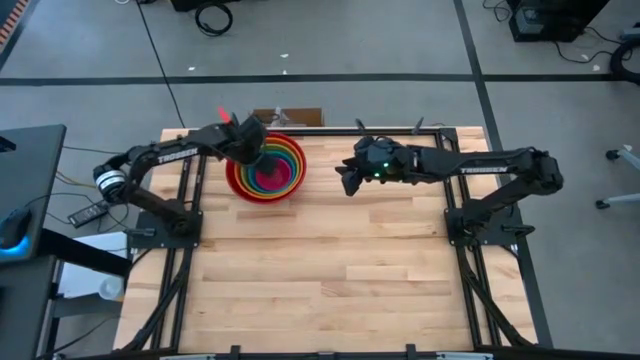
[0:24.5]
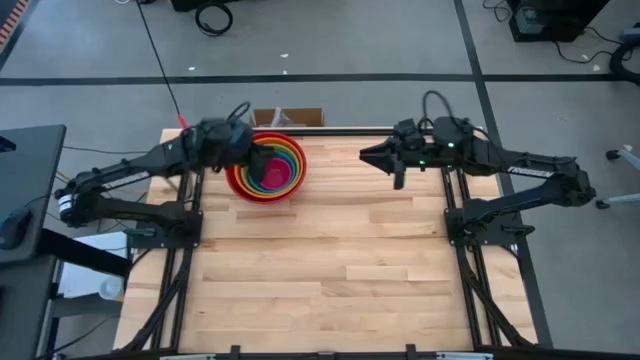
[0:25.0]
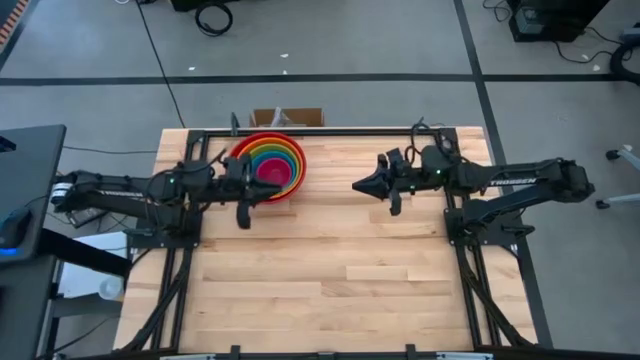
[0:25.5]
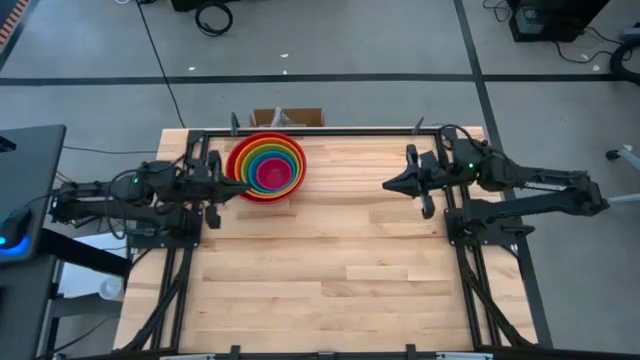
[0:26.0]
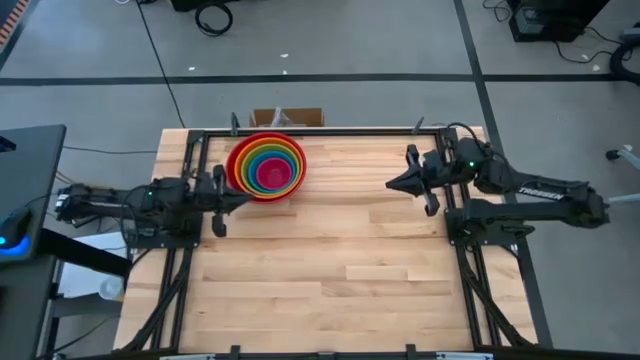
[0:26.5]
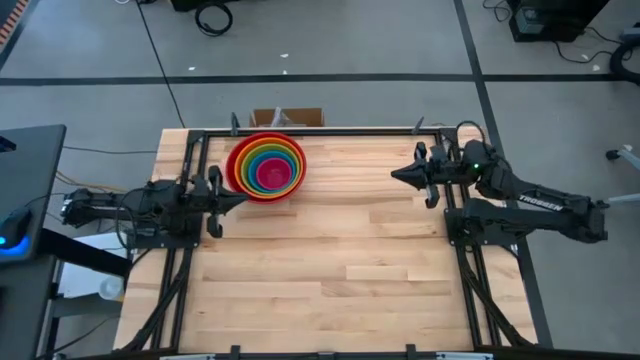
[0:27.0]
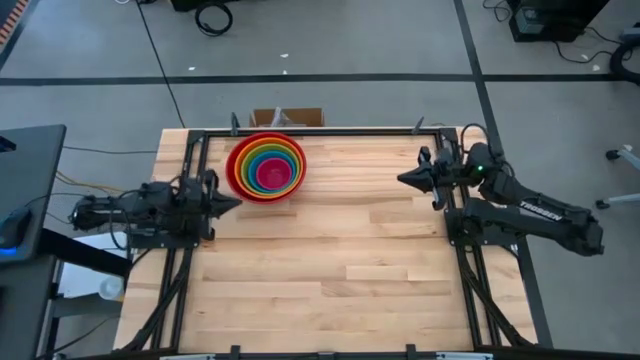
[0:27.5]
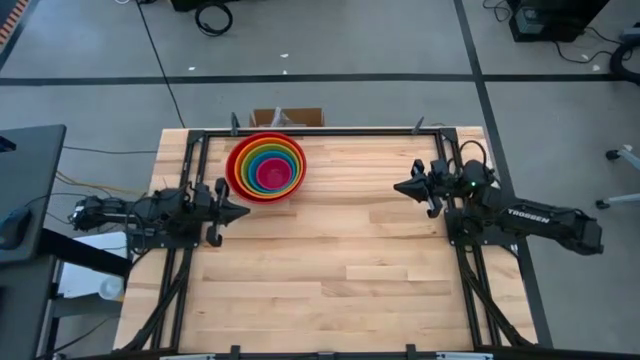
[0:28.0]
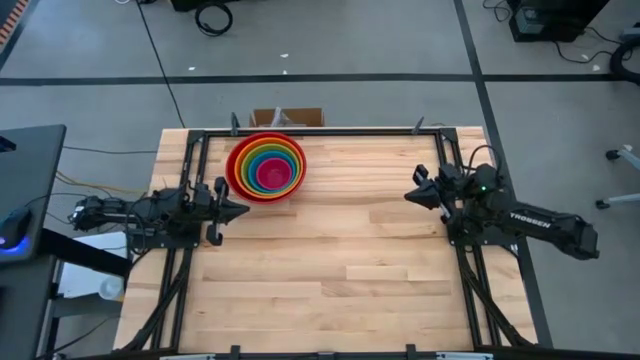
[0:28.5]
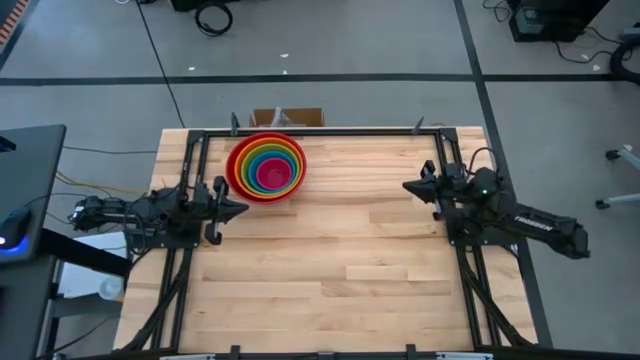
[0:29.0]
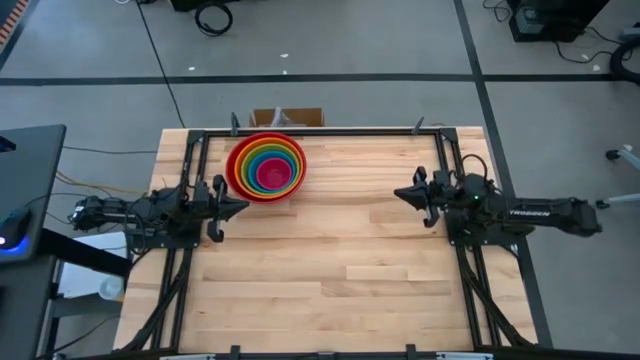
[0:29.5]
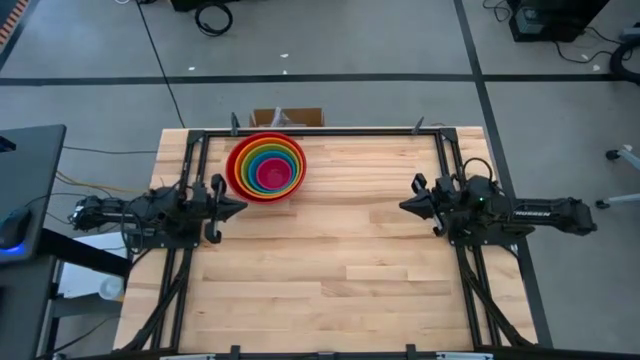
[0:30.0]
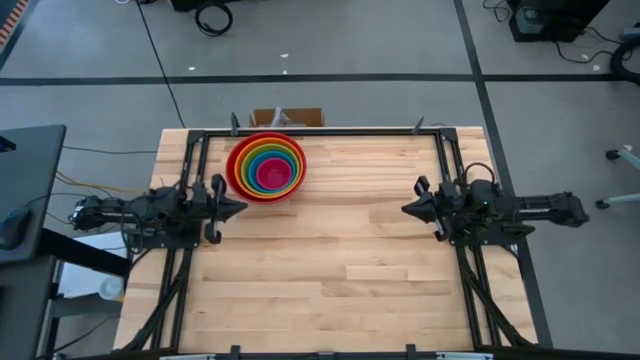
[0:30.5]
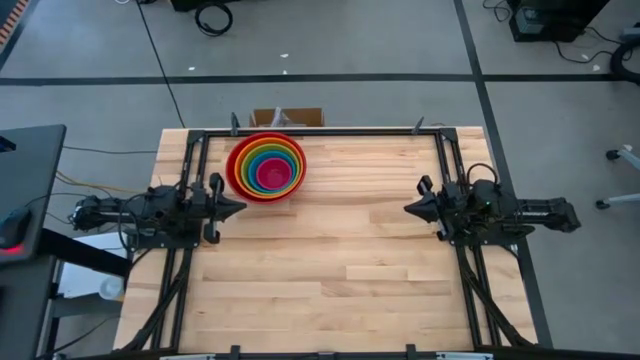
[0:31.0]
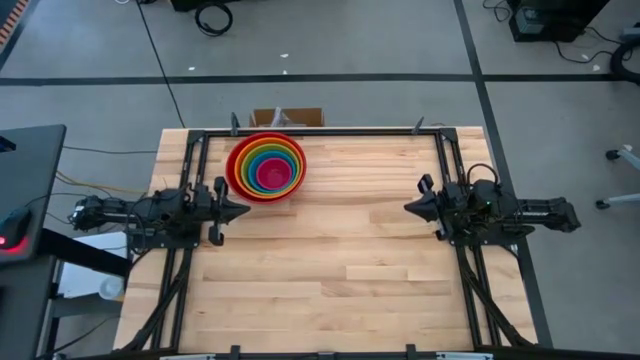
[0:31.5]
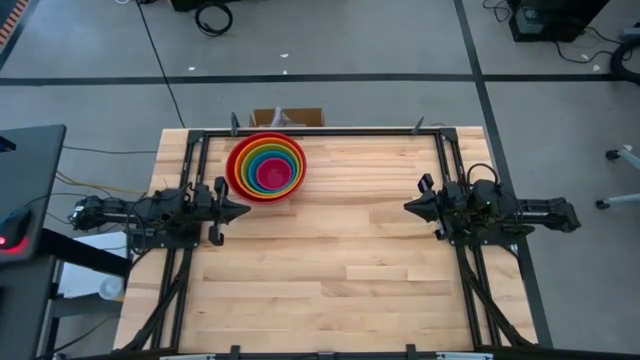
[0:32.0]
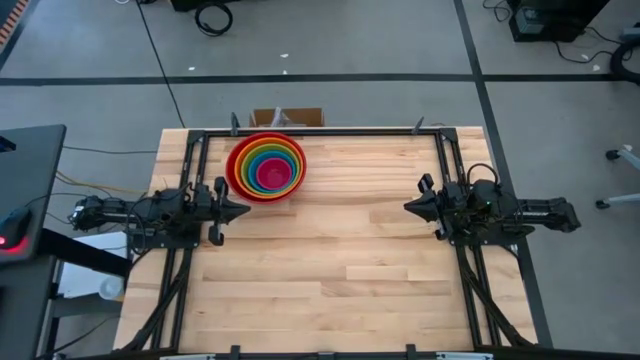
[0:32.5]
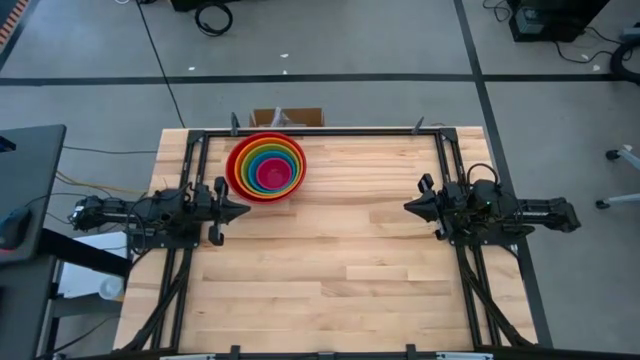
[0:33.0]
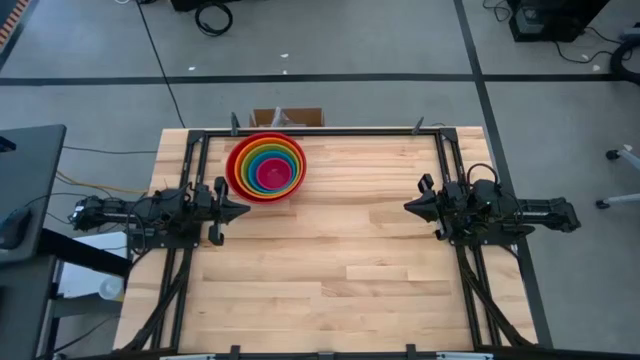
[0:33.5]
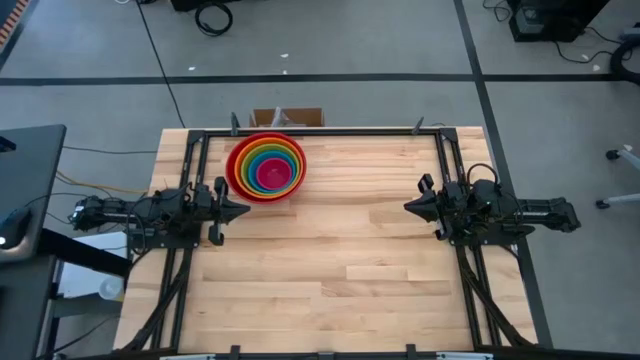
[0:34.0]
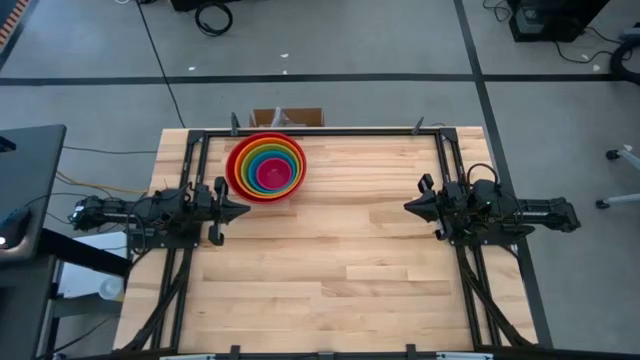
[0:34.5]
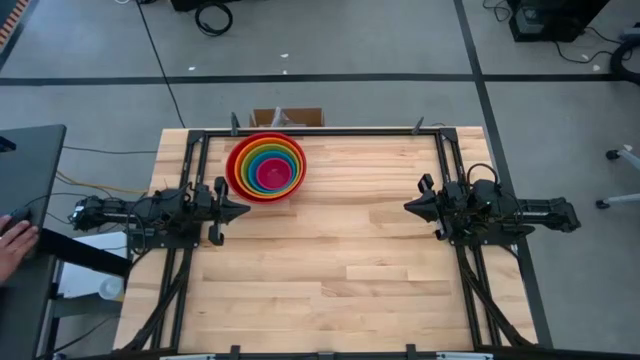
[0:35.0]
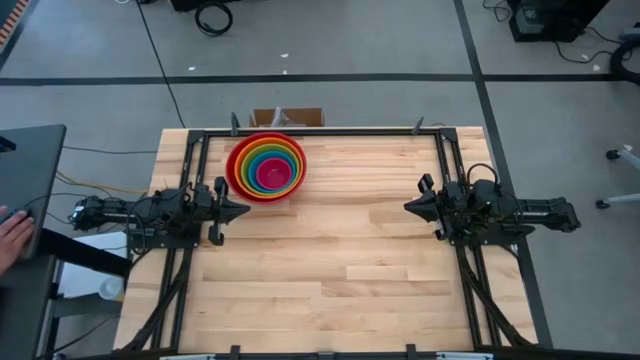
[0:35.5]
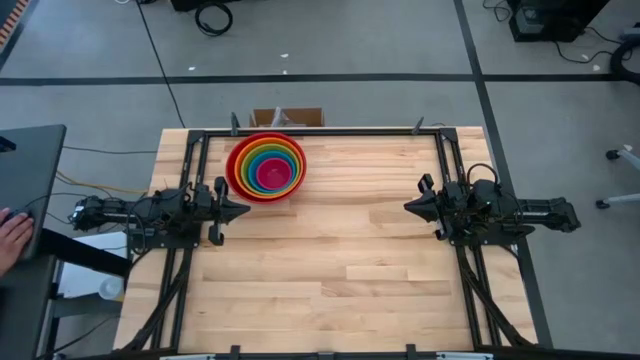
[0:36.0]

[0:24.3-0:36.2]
Return to Home Position

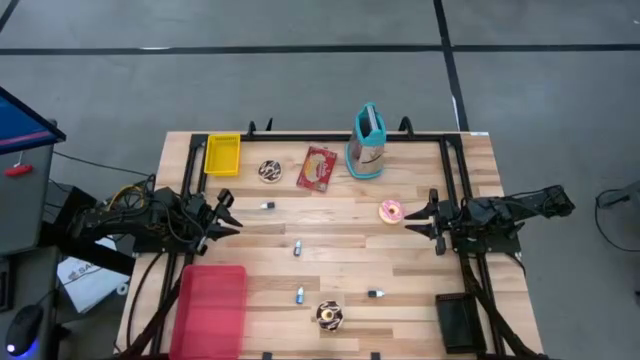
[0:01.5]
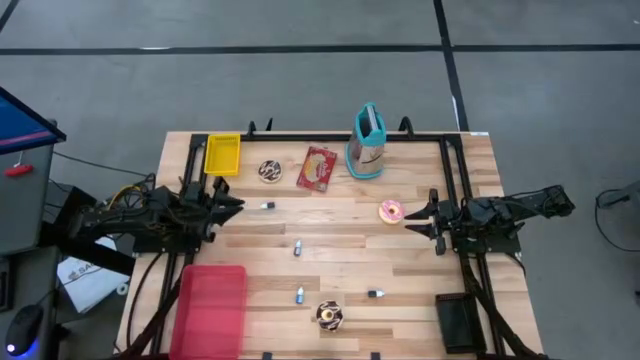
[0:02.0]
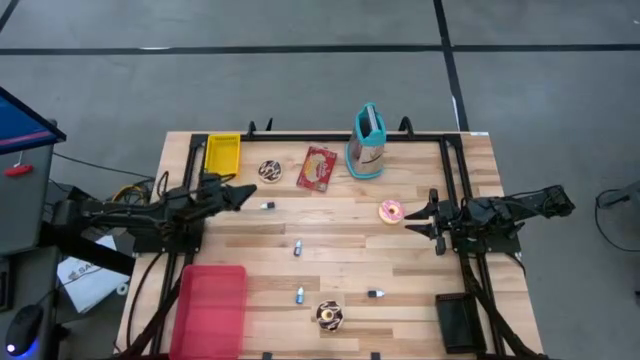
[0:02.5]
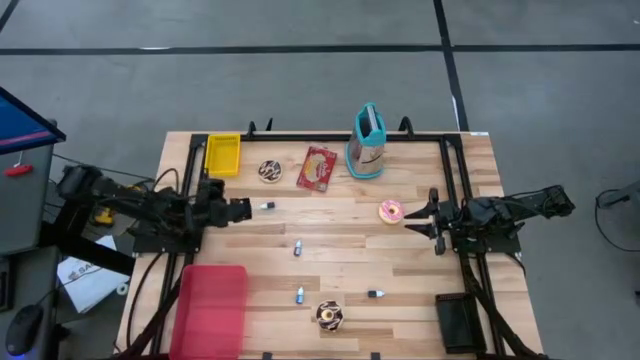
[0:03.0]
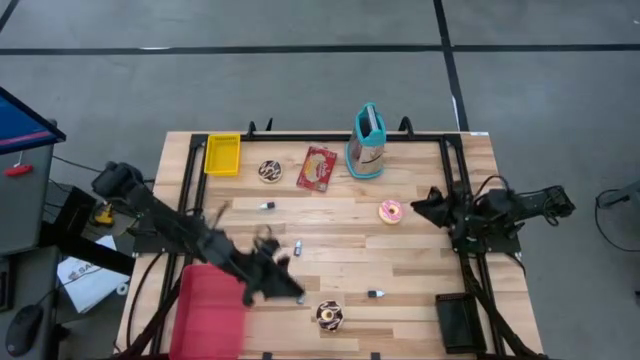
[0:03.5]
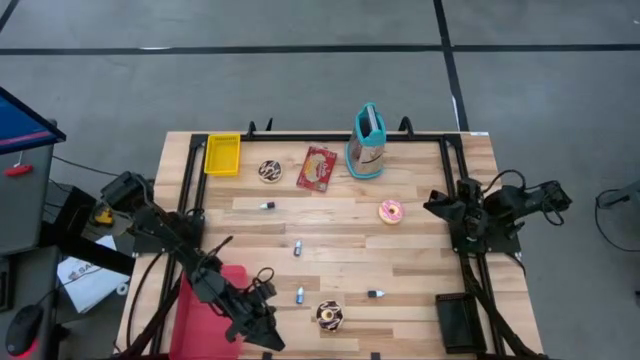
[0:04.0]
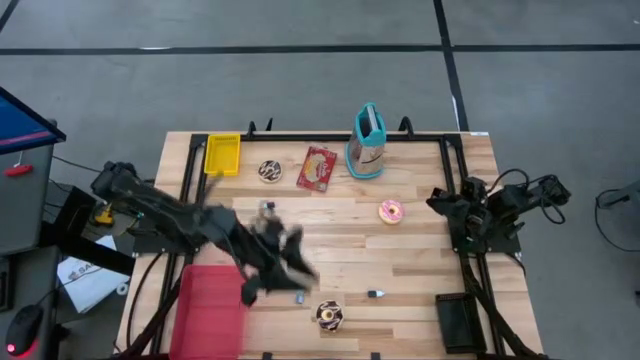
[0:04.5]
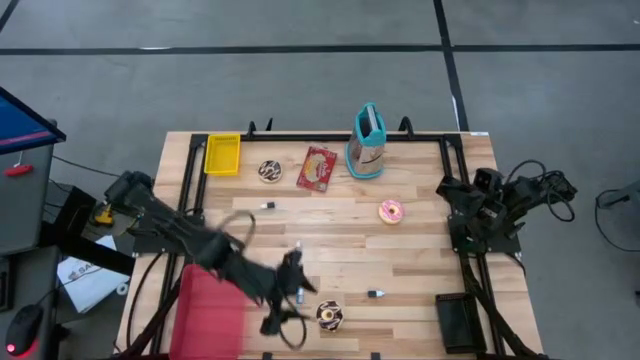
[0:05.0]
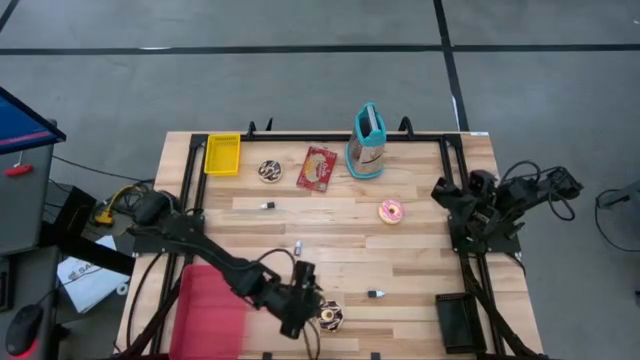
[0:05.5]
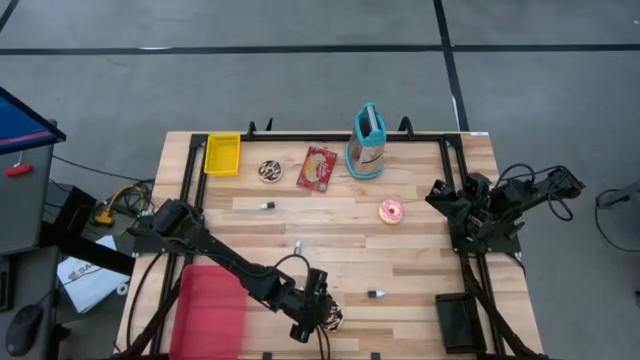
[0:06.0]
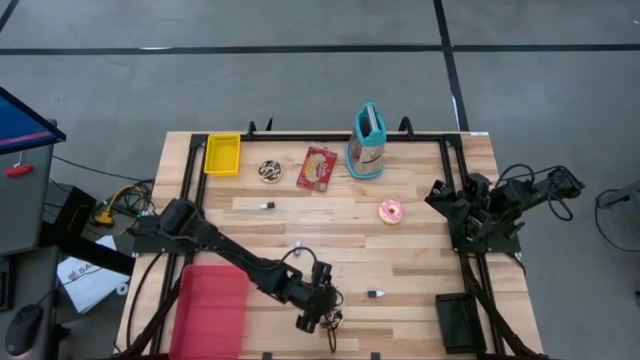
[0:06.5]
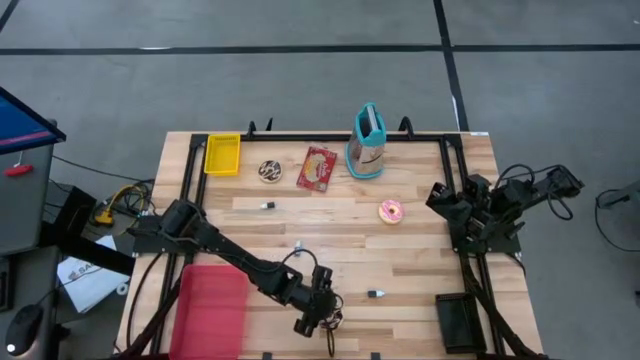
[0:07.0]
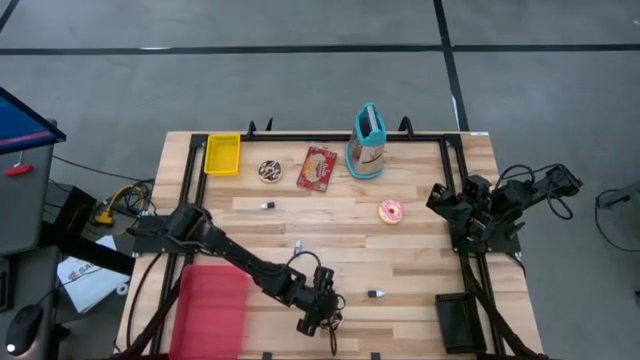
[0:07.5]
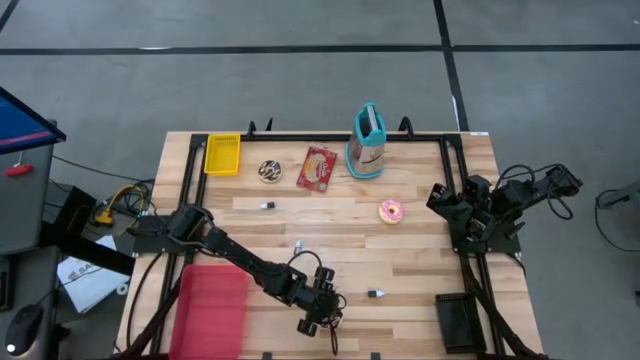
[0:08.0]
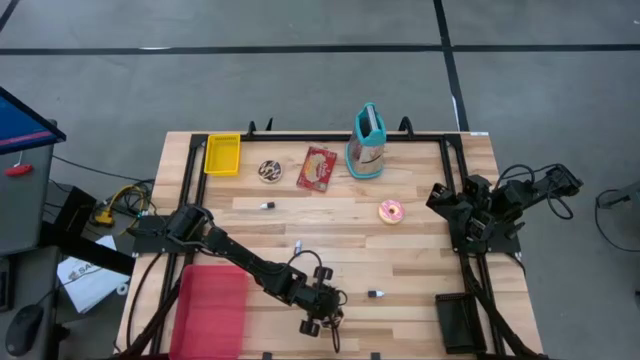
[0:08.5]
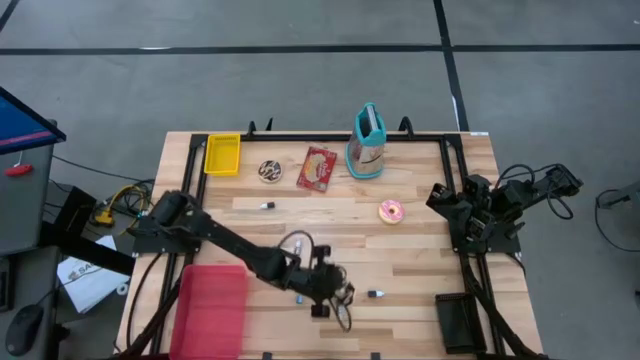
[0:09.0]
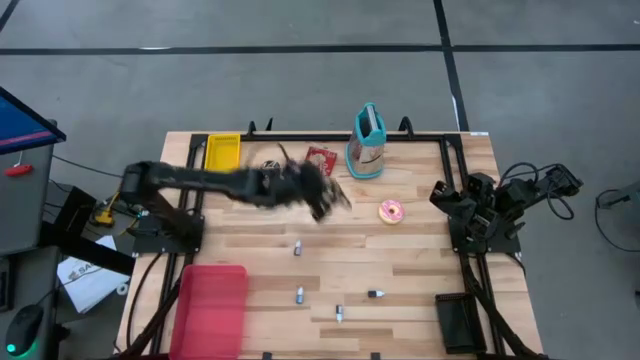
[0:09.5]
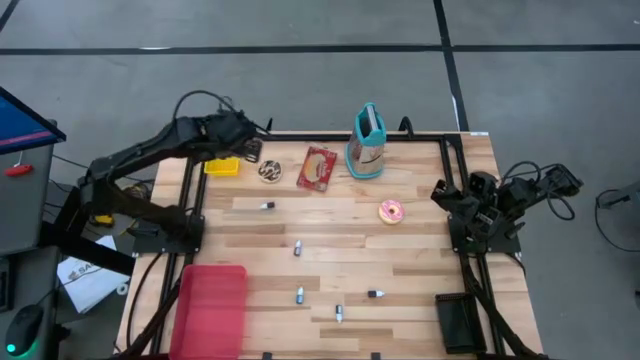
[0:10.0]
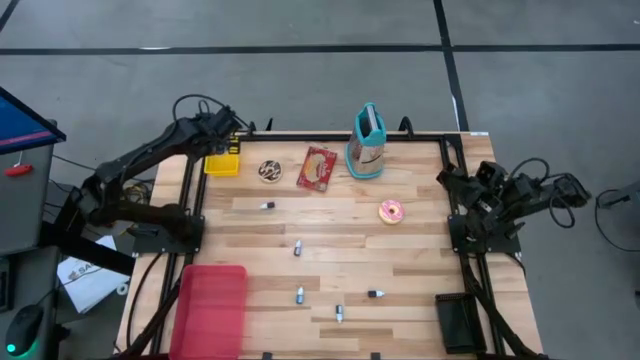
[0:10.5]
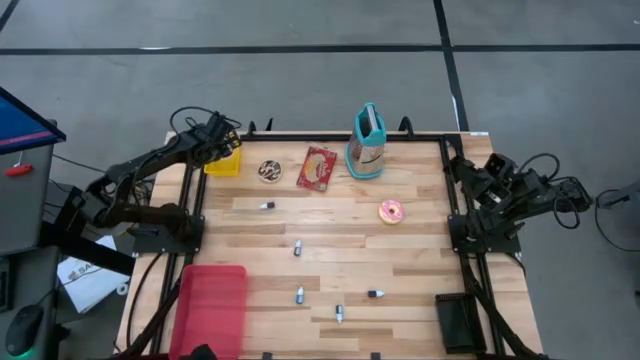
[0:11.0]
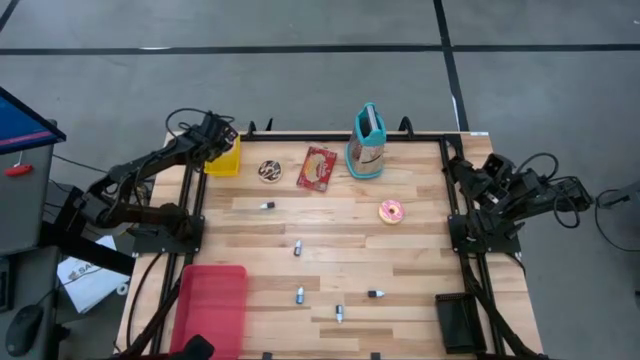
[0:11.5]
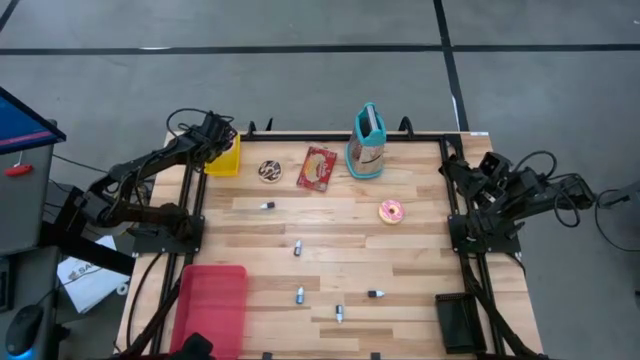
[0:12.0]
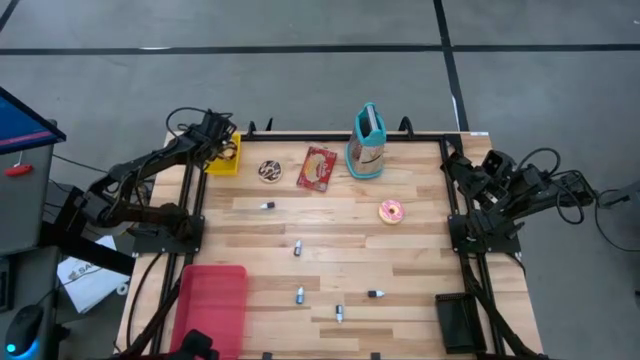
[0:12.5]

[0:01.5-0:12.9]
Put the bottom black donut into the yellow basket
